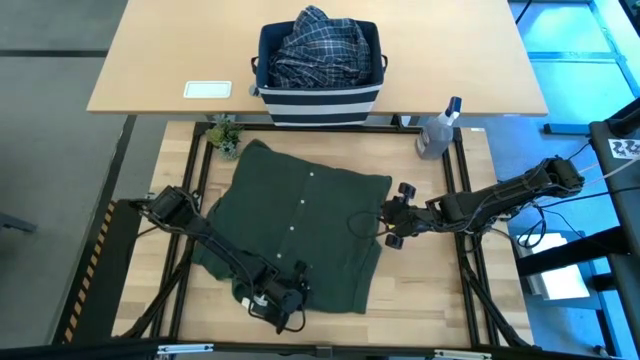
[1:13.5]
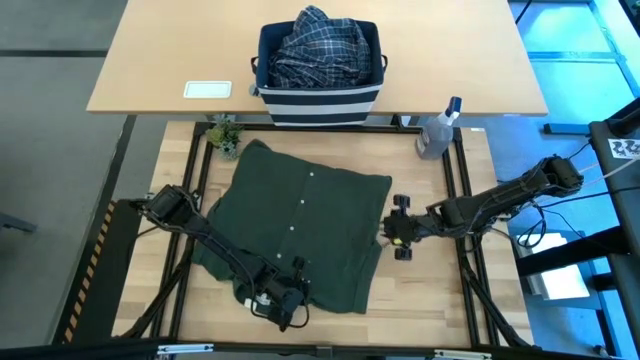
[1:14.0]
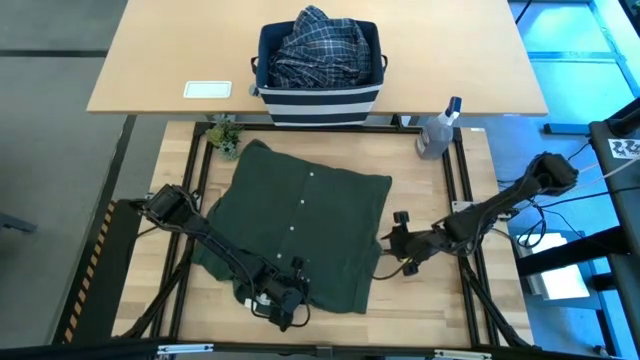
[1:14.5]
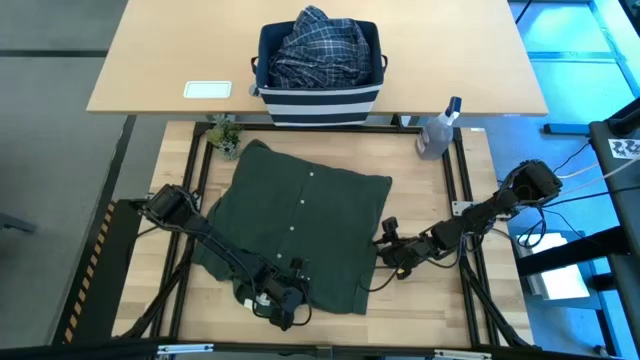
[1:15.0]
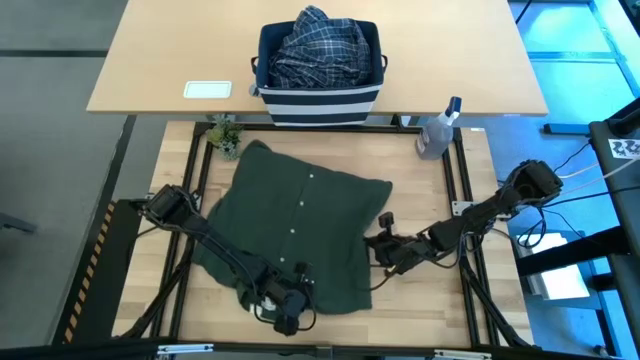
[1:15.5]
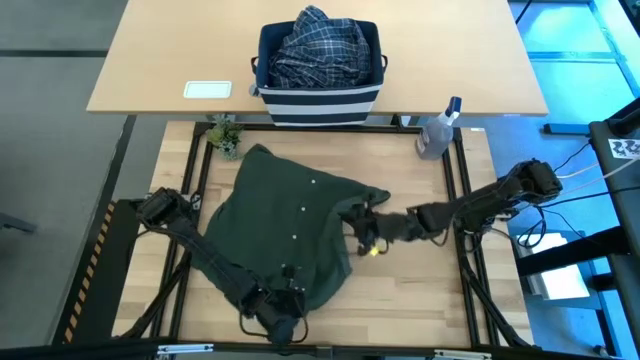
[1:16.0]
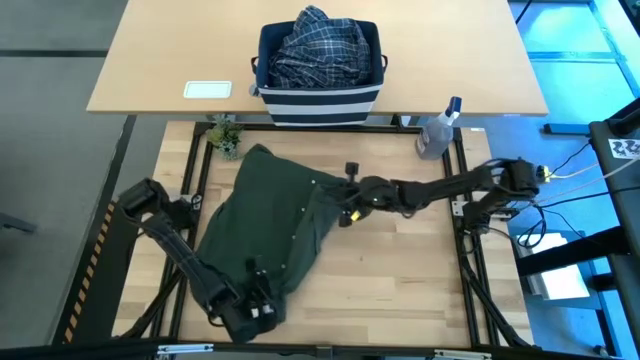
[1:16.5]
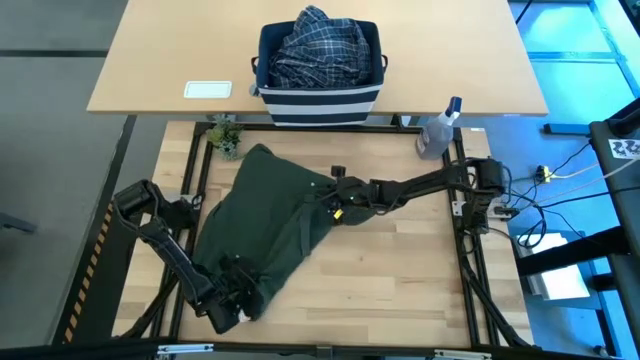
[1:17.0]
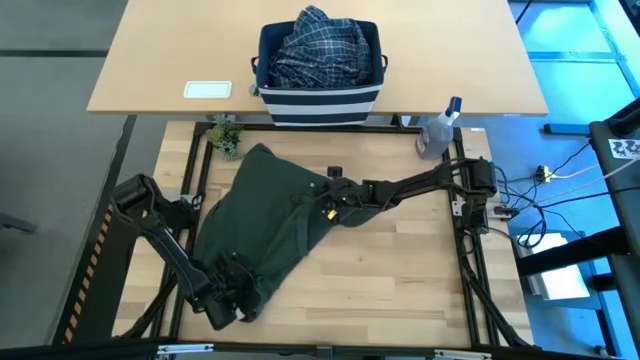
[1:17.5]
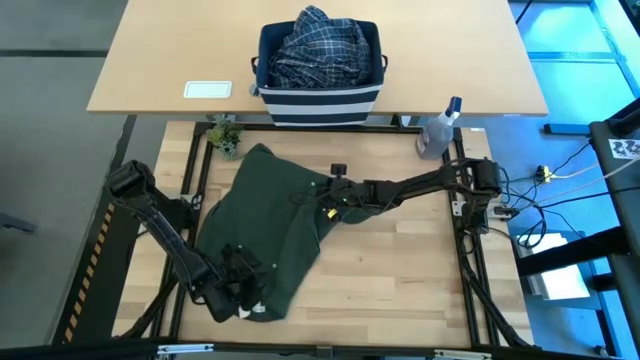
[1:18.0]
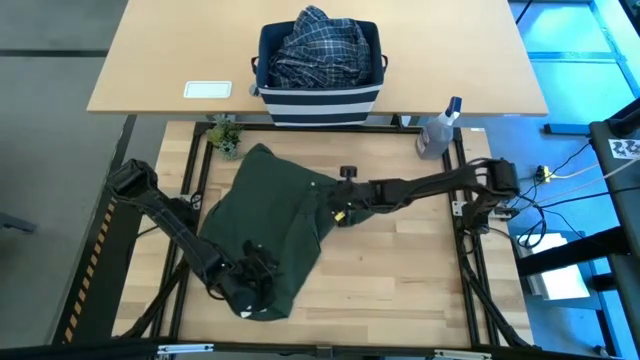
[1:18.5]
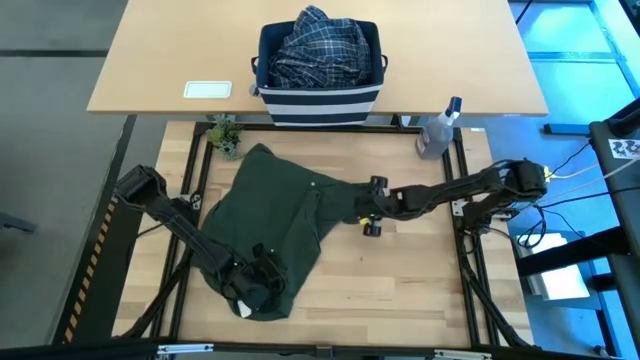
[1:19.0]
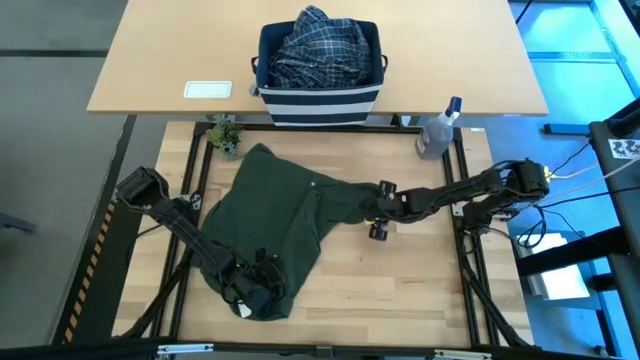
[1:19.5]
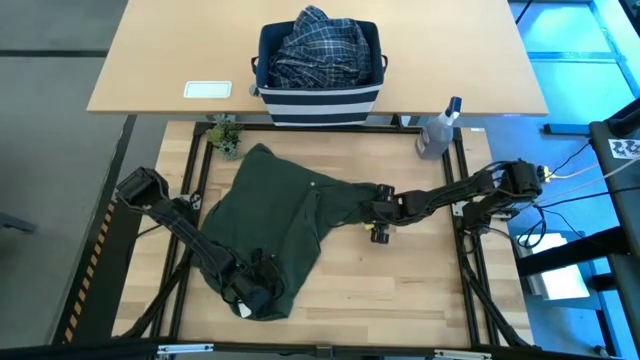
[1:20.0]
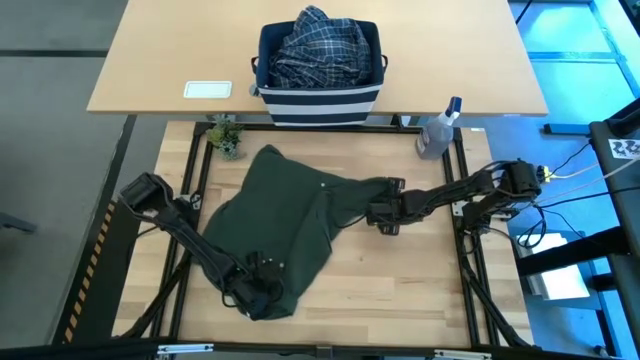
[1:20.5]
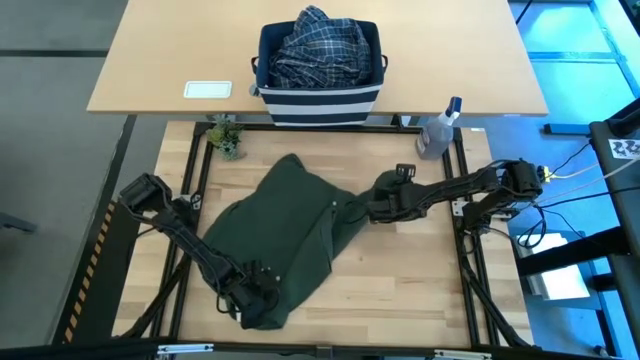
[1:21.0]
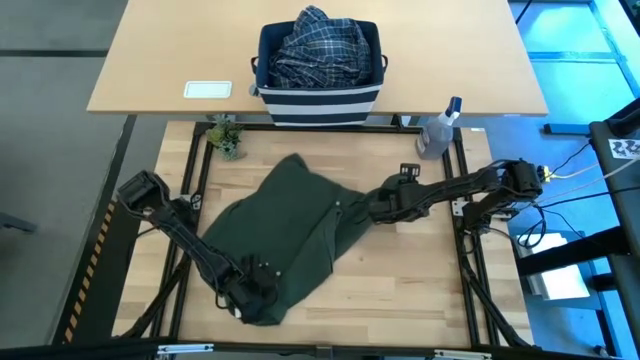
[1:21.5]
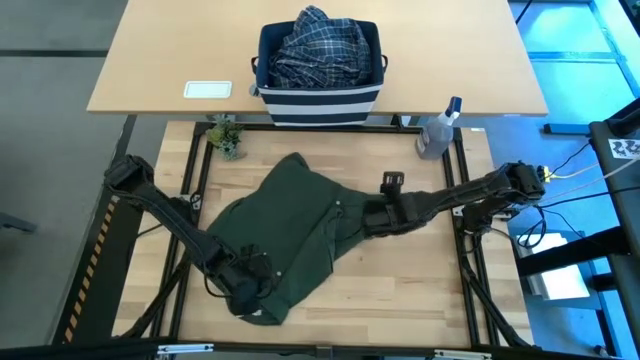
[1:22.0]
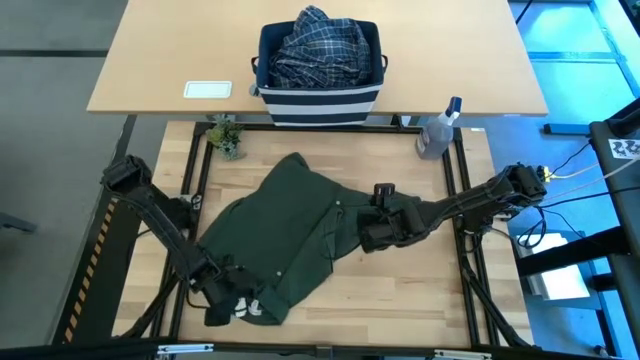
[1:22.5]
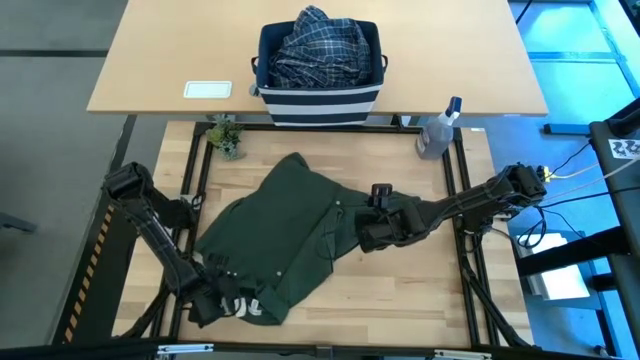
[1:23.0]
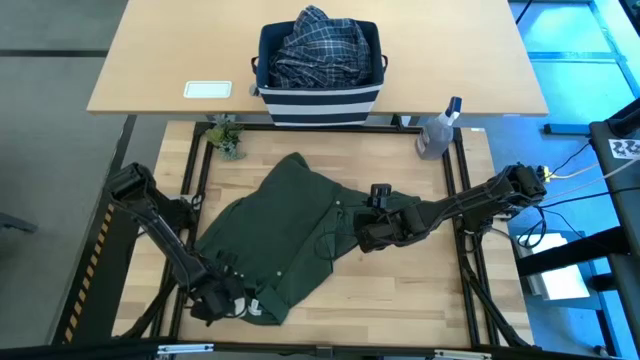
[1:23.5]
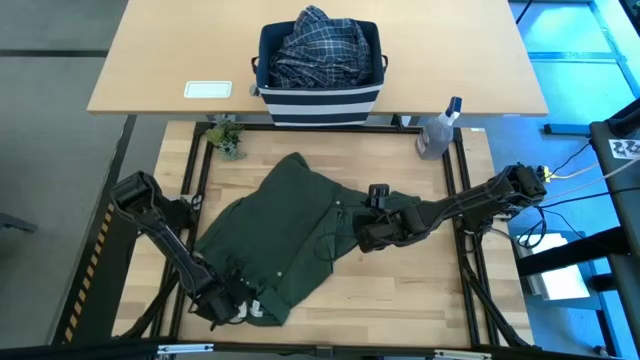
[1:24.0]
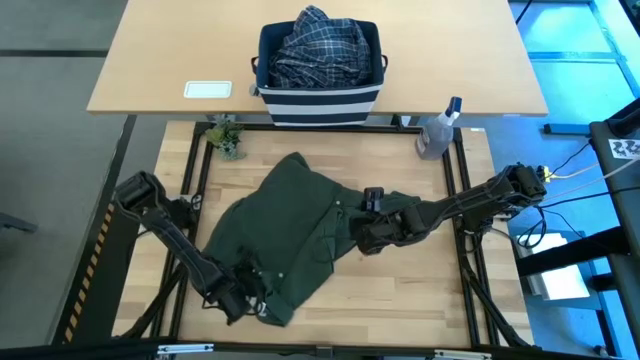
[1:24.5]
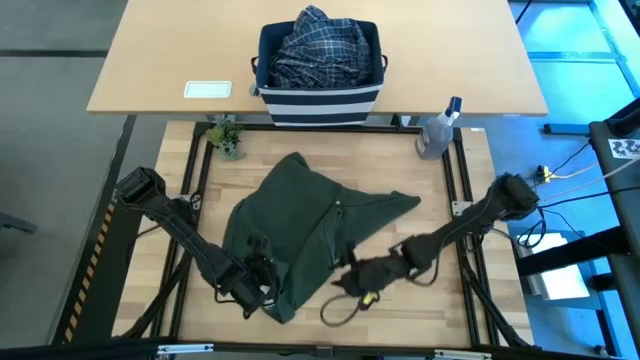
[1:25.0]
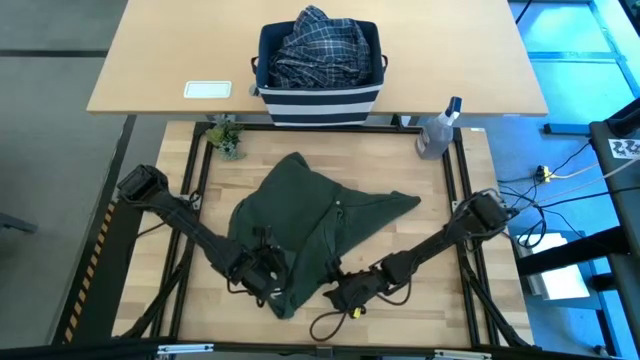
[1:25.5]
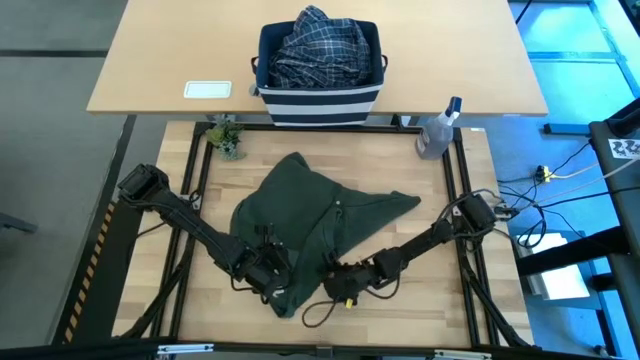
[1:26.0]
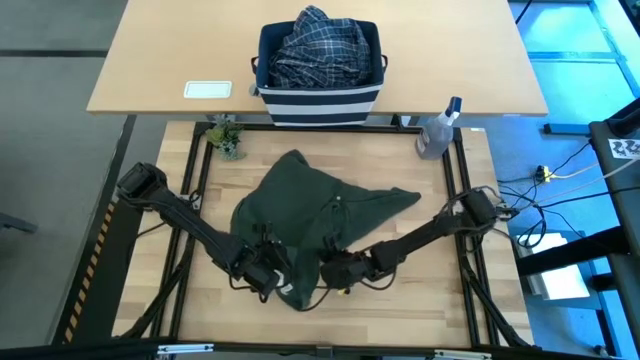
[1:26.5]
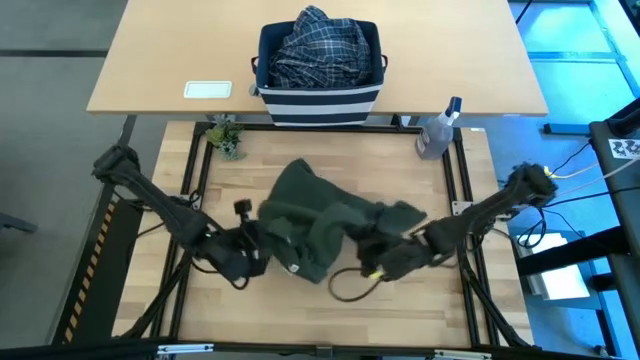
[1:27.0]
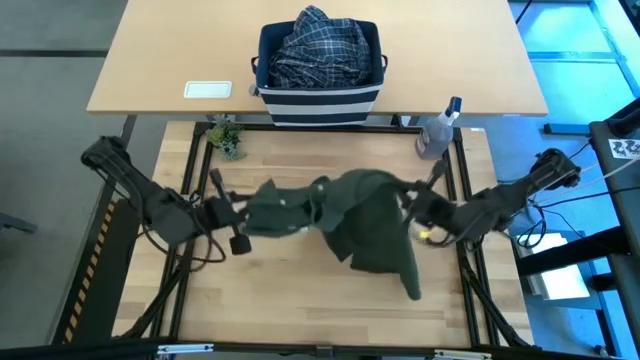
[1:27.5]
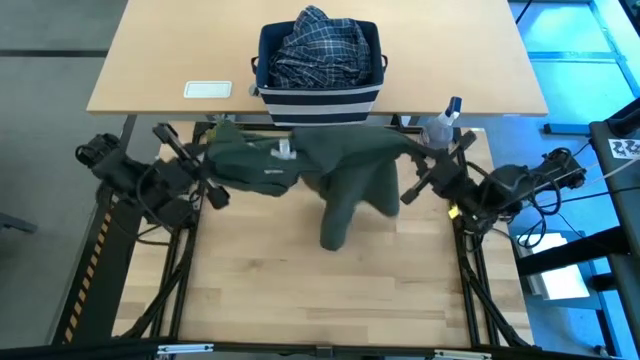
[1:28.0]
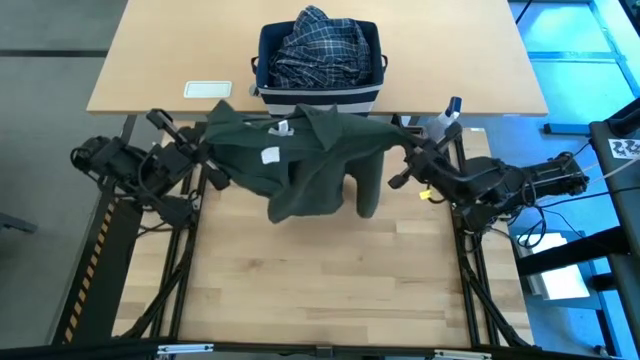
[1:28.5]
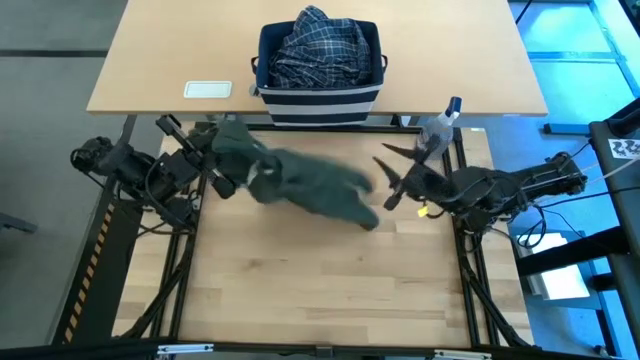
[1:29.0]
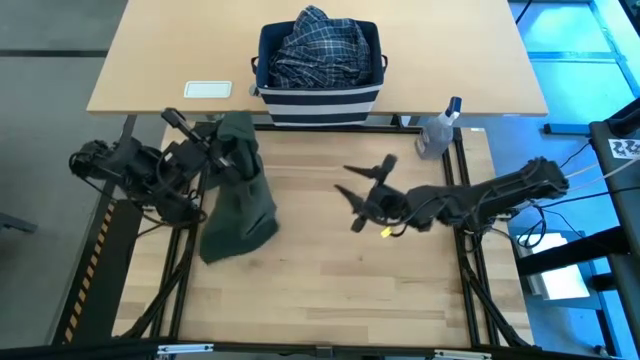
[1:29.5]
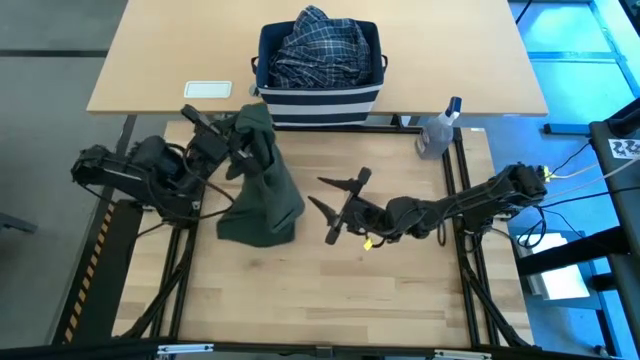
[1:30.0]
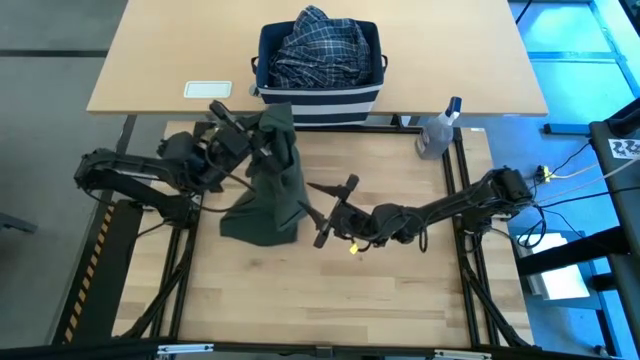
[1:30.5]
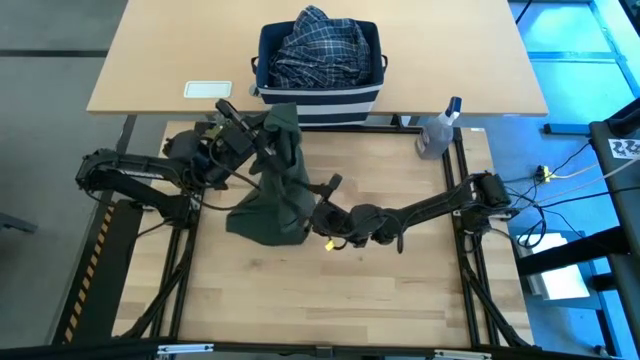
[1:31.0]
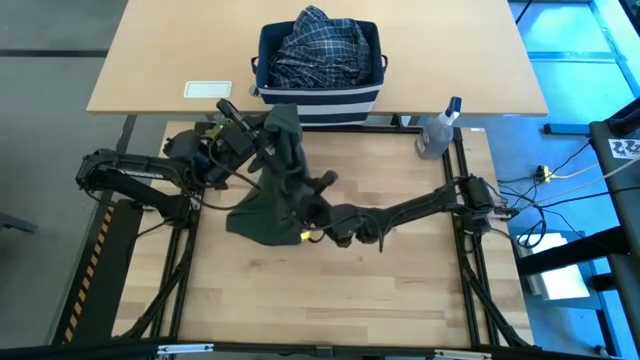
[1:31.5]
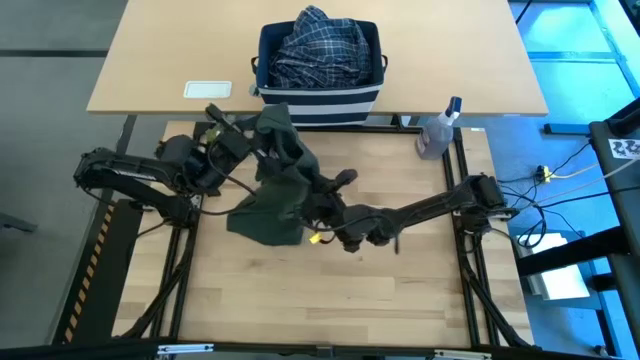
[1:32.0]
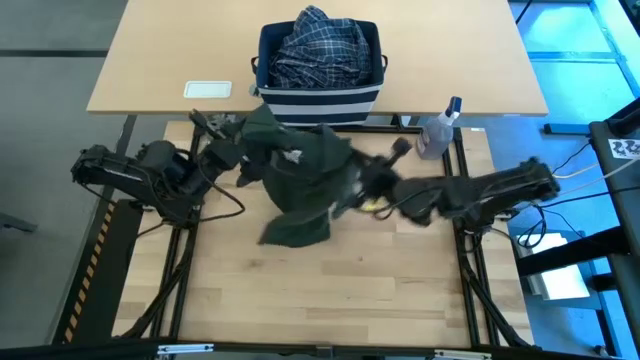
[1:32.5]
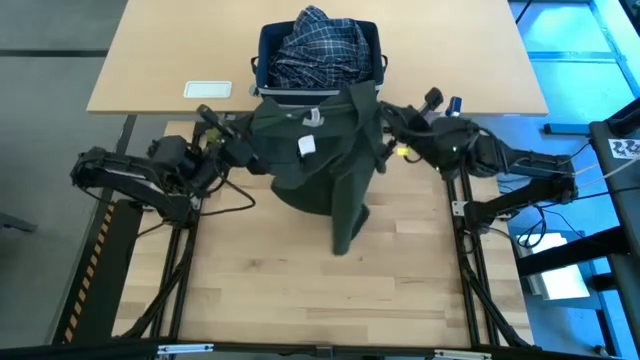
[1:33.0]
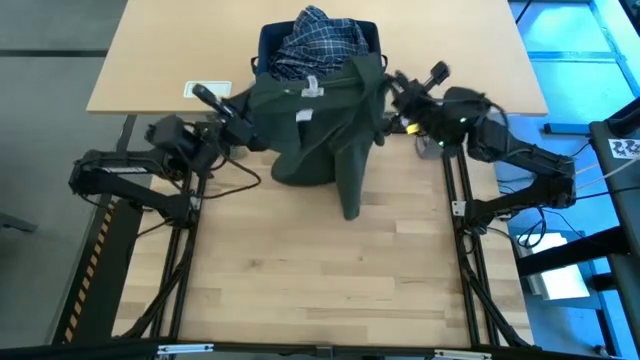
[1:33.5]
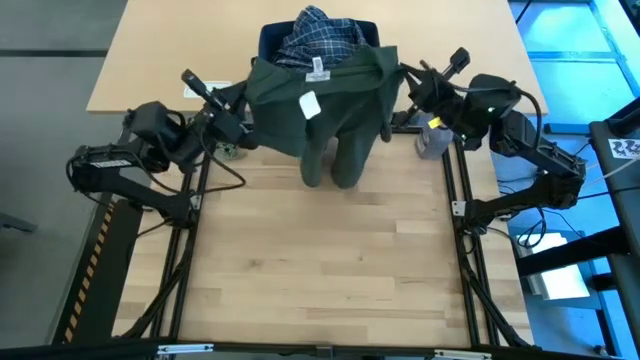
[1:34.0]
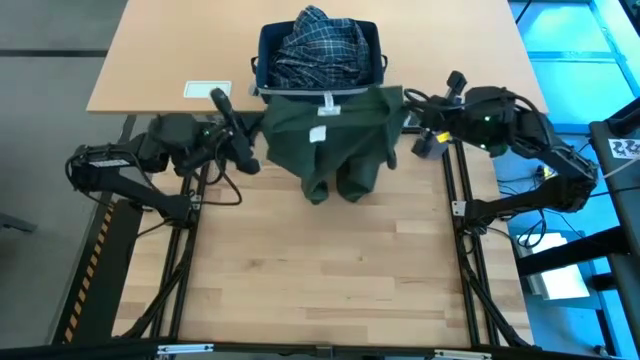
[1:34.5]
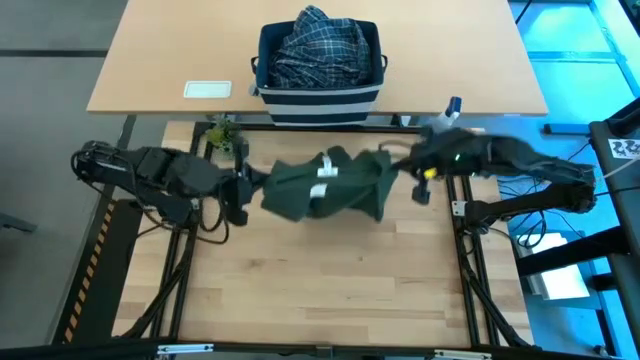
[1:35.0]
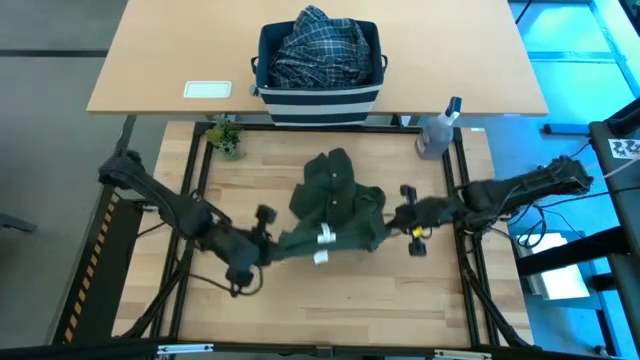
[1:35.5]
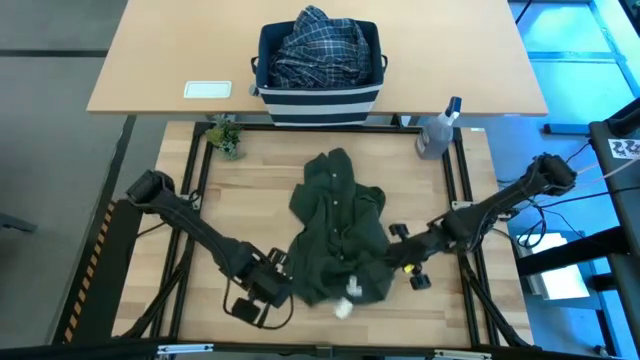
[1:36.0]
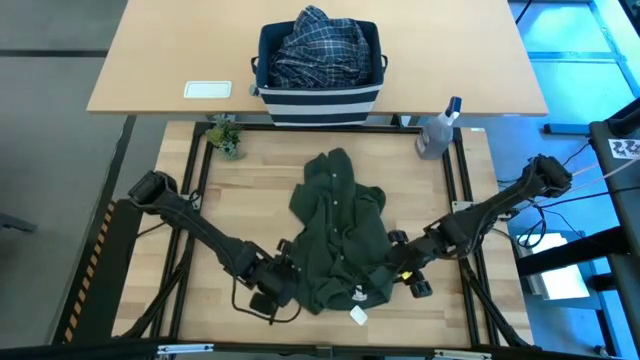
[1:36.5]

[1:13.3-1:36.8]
Task: Fold Laundry from Bin
Fold the green polo shirt
